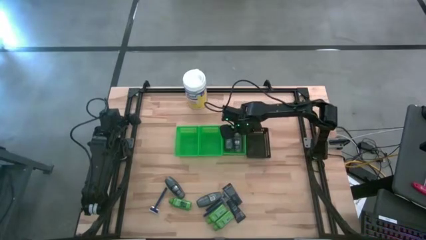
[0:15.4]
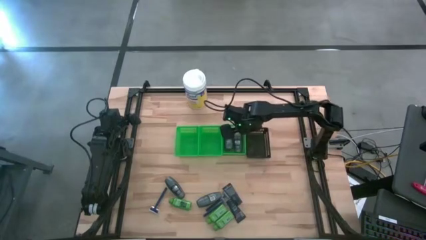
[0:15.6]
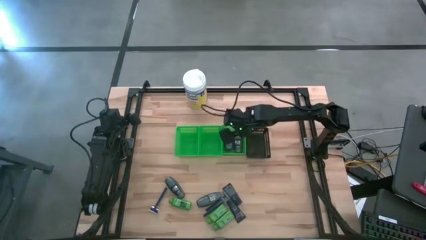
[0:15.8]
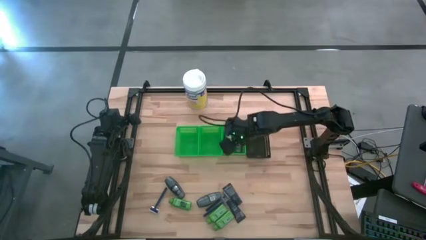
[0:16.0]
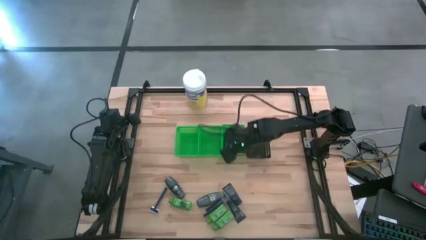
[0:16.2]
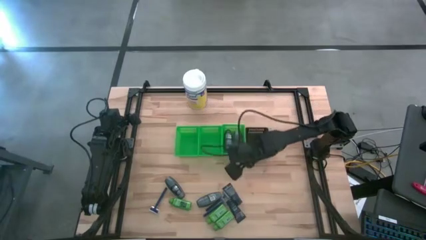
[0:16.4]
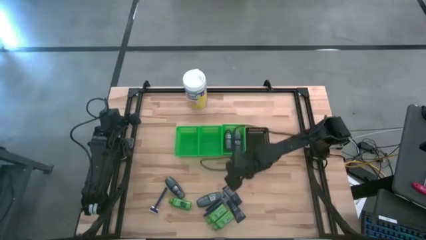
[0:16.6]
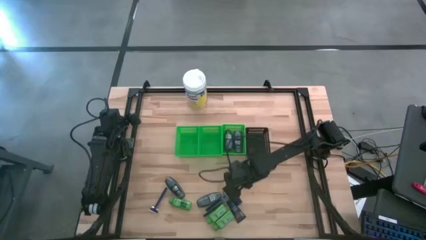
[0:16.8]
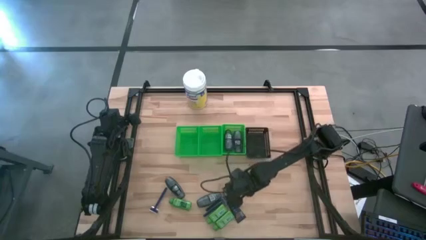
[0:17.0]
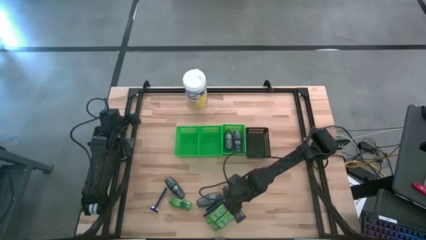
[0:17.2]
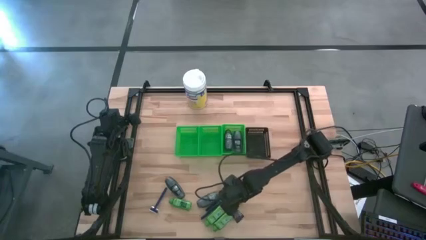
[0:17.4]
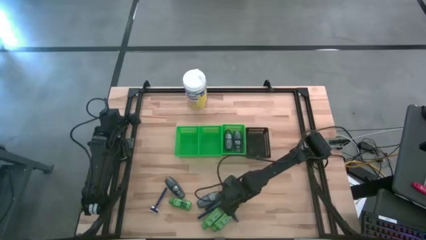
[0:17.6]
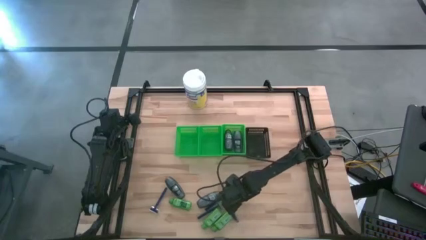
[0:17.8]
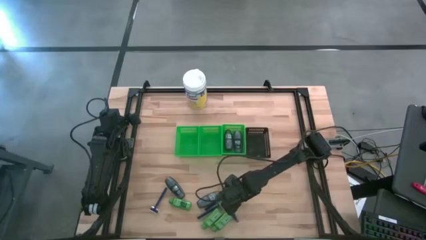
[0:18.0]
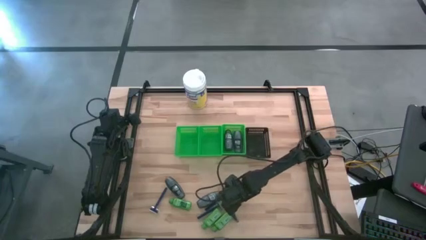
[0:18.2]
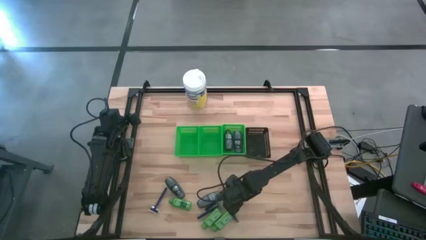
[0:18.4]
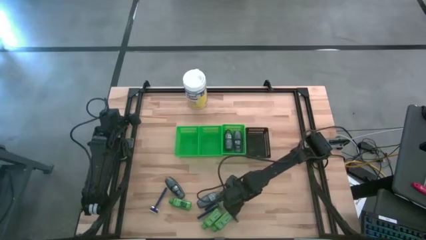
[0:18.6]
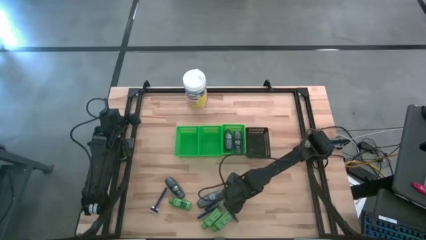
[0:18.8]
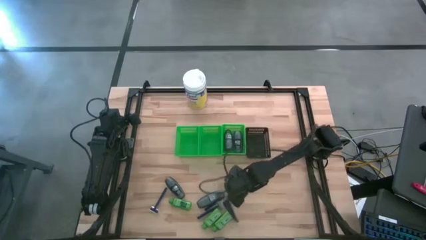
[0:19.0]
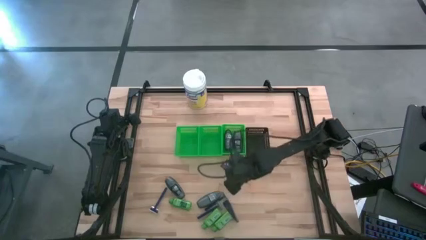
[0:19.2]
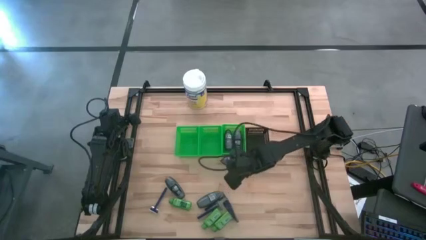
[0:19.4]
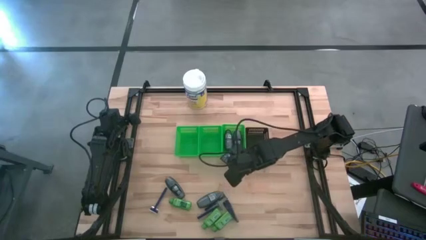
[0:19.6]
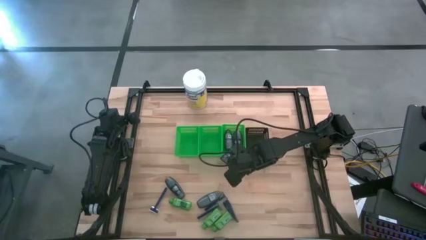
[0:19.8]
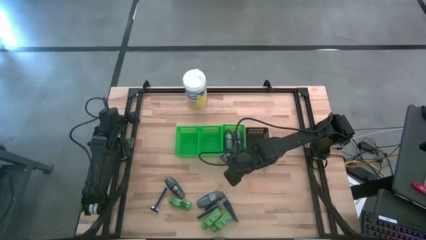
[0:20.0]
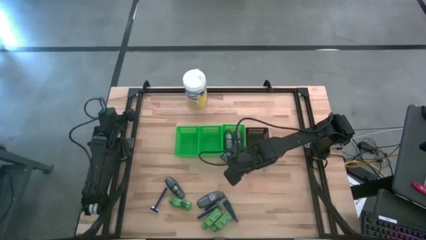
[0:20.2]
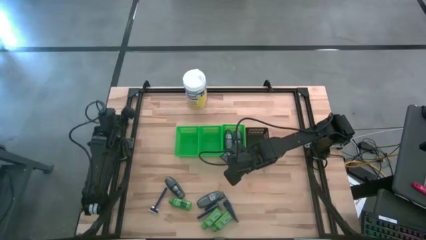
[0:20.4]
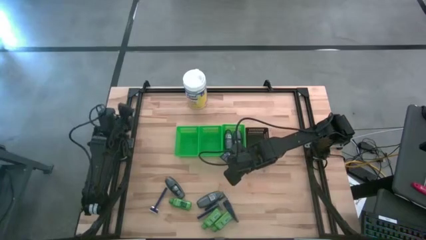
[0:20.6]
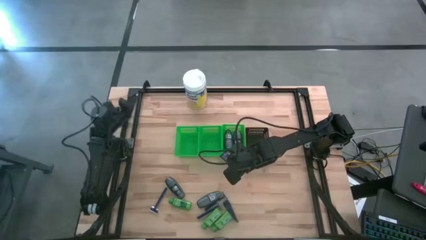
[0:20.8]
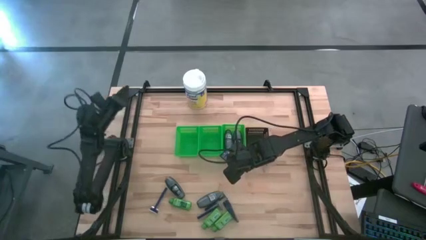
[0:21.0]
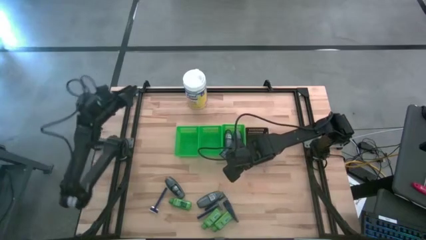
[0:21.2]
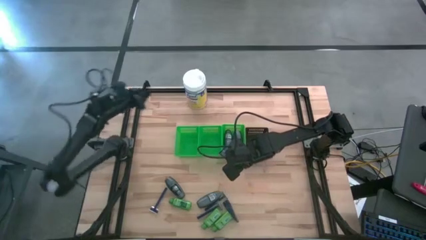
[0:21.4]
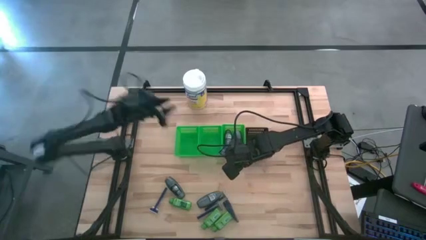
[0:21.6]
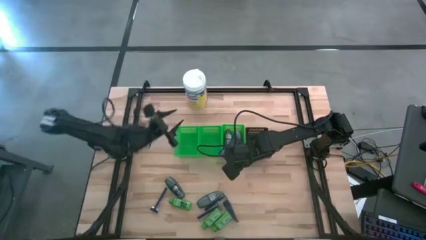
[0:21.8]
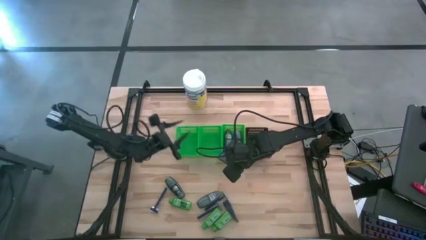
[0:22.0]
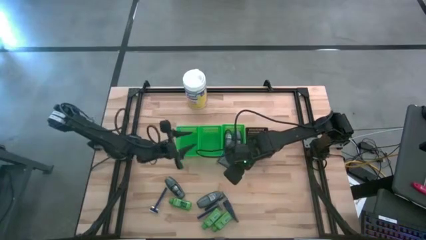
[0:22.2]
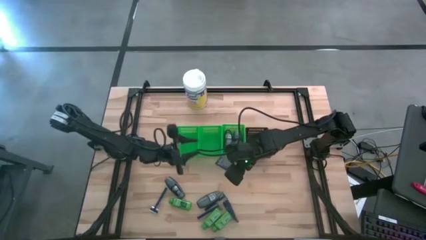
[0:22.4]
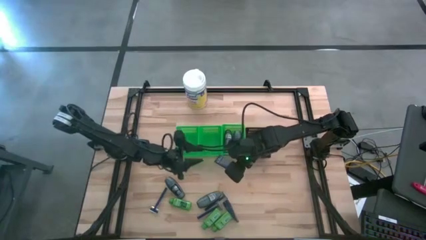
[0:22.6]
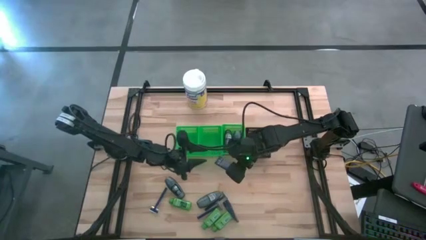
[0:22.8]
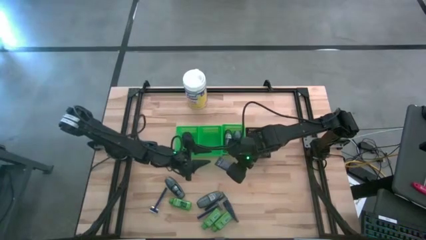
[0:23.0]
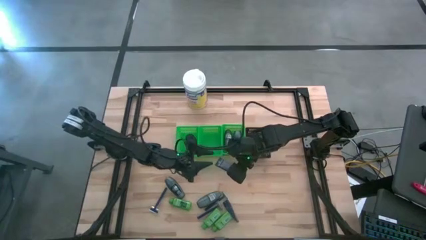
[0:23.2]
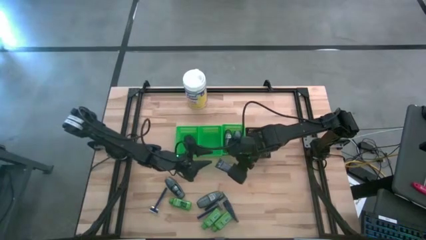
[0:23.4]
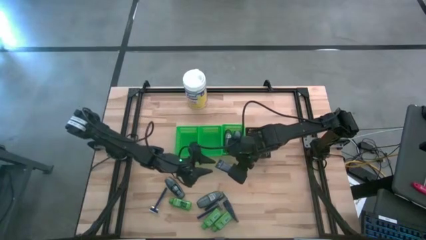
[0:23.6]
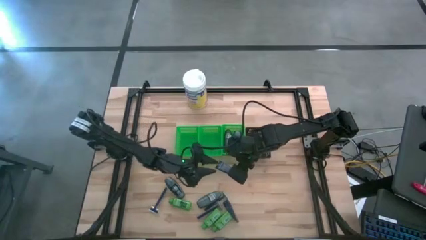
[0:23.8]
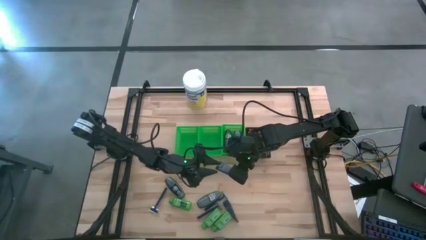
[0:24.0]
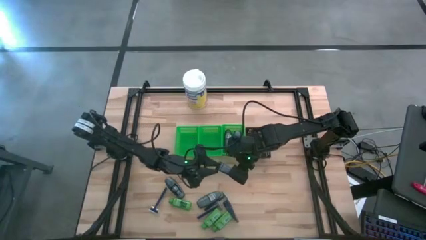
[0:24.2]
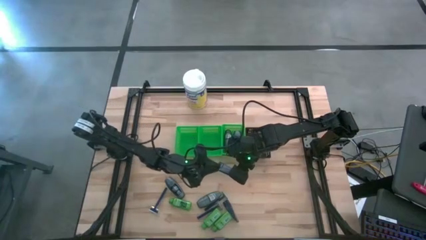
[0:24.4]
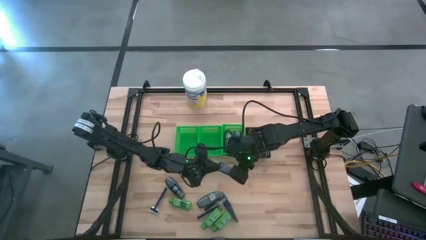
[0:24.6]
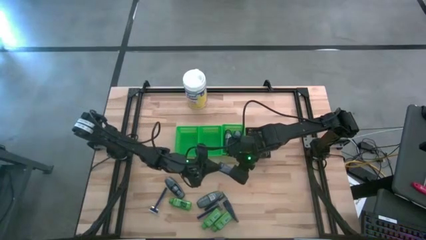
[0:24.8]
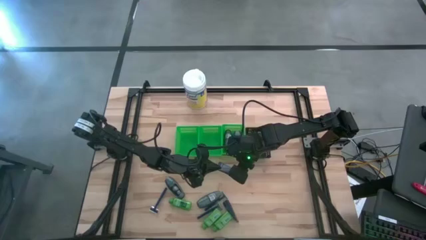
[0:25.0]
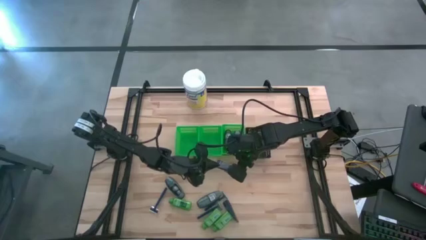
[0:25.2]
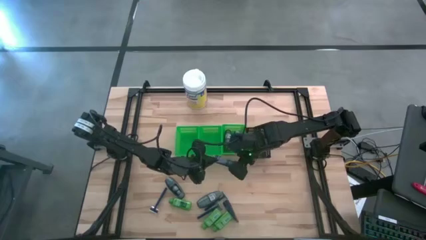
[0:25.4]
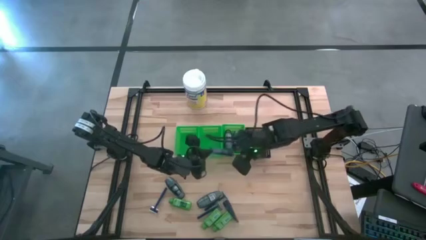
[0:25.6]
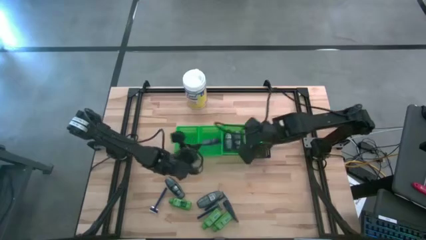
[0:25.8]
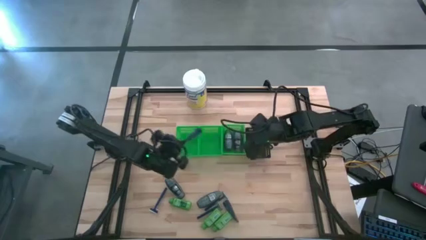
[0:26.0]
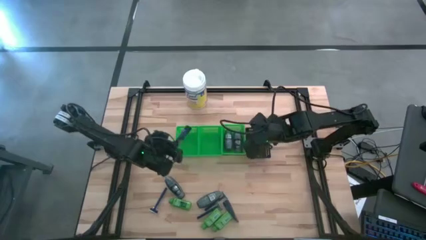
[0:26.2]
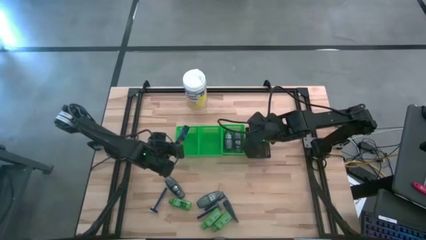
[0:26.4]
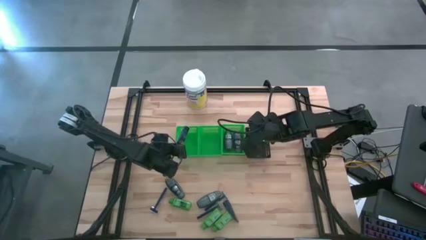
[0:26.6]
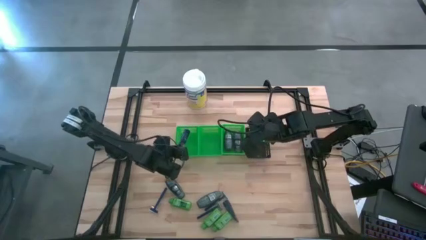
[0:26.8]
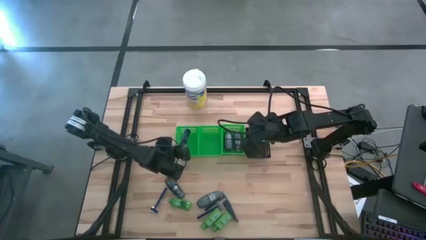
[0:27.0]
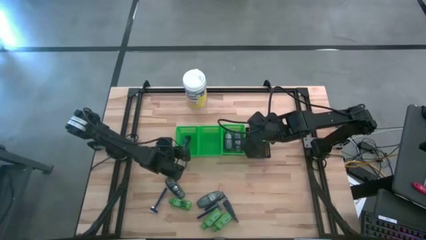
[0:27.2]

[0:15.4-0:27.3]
Task: Pick & Place Travel size toiletries
Put the dark blue shave cream into the left green bin

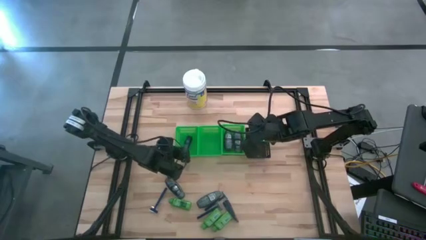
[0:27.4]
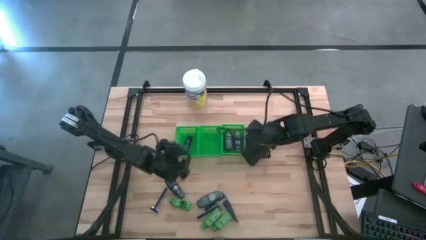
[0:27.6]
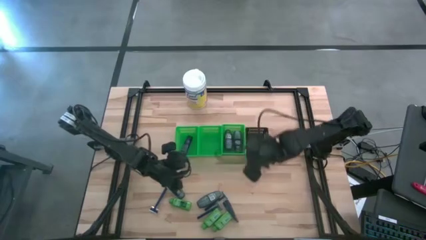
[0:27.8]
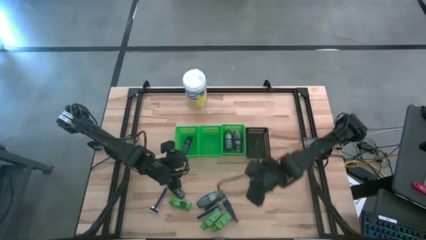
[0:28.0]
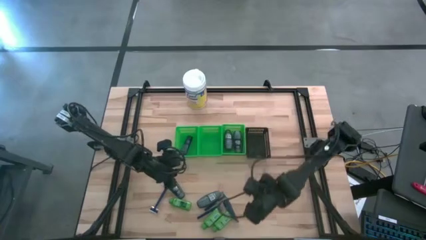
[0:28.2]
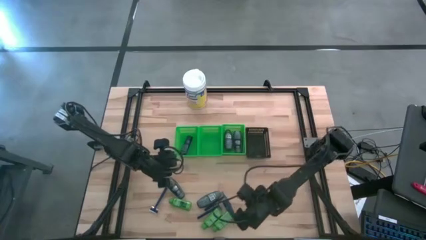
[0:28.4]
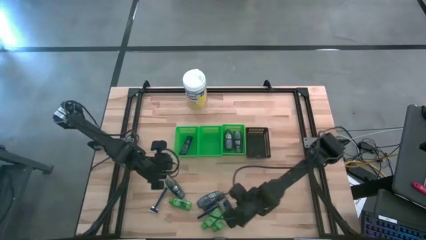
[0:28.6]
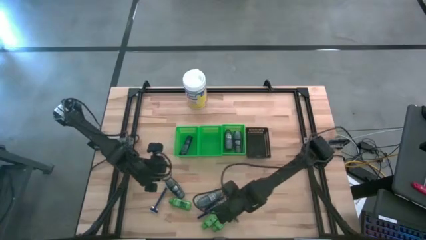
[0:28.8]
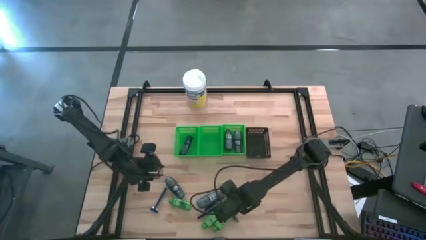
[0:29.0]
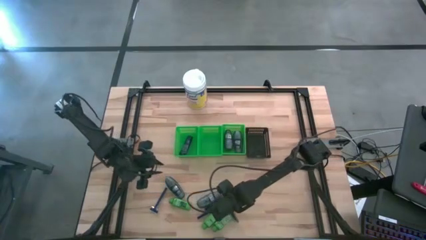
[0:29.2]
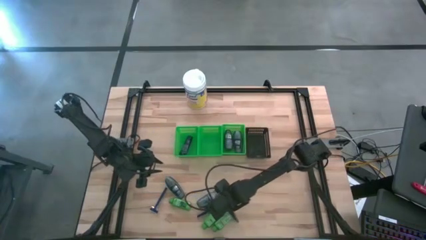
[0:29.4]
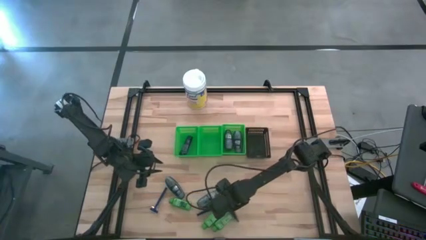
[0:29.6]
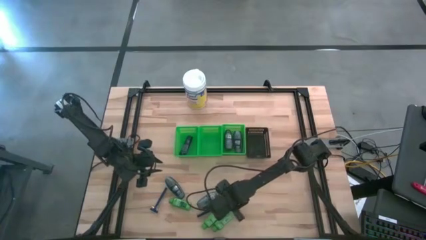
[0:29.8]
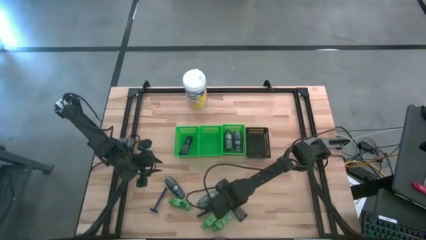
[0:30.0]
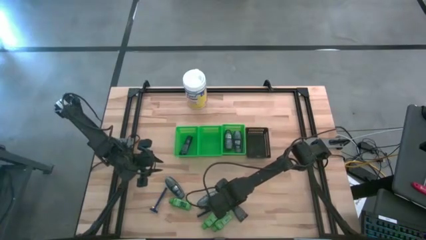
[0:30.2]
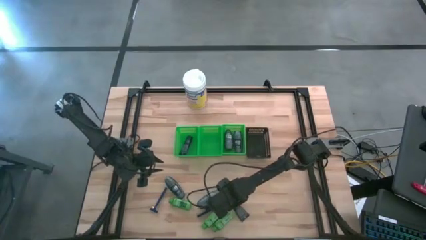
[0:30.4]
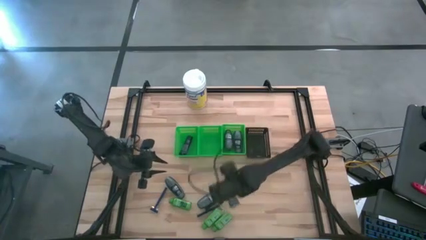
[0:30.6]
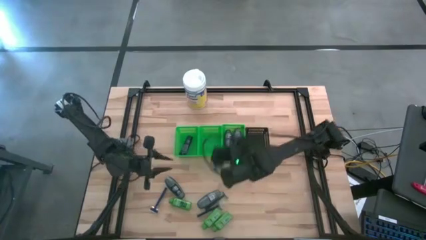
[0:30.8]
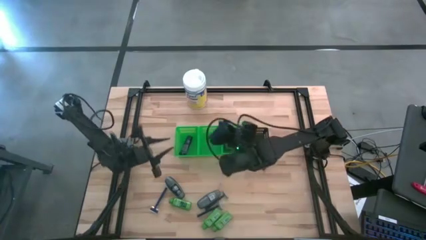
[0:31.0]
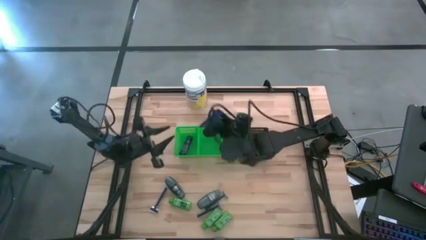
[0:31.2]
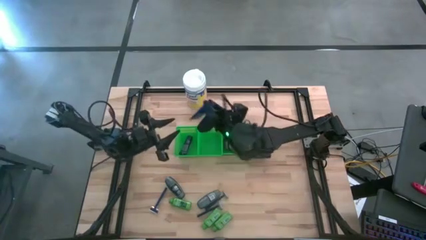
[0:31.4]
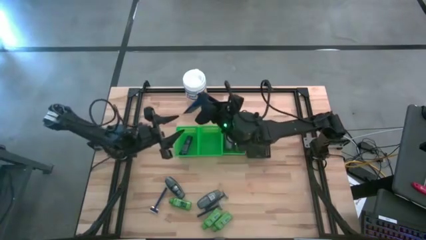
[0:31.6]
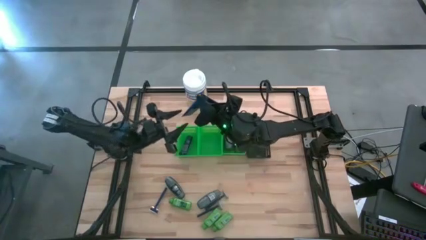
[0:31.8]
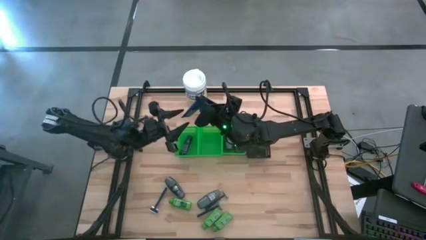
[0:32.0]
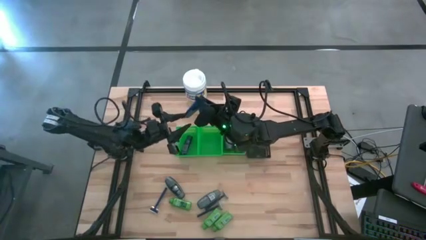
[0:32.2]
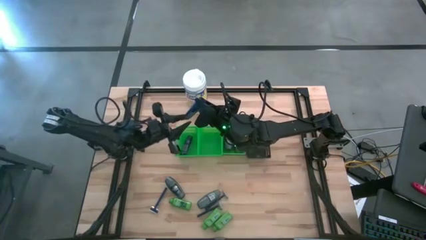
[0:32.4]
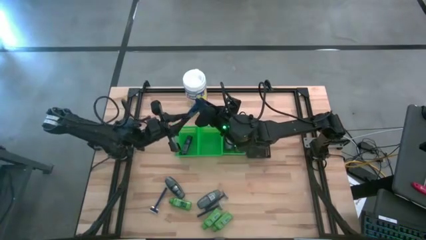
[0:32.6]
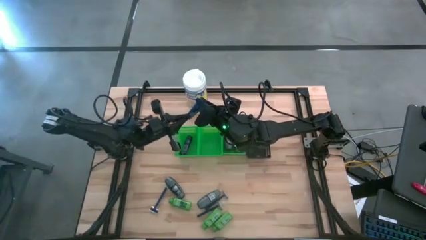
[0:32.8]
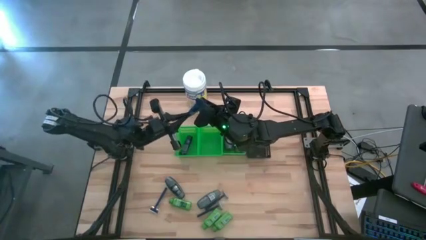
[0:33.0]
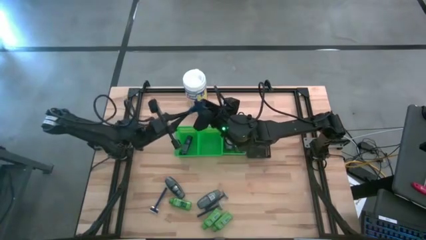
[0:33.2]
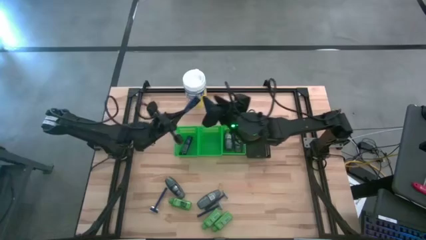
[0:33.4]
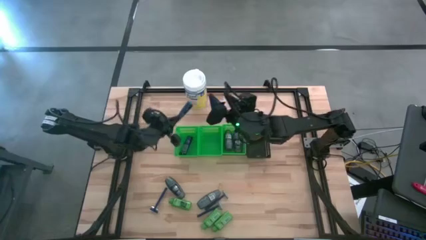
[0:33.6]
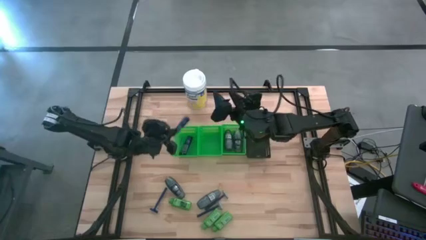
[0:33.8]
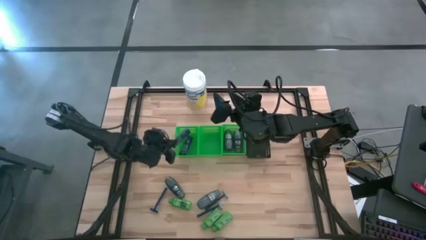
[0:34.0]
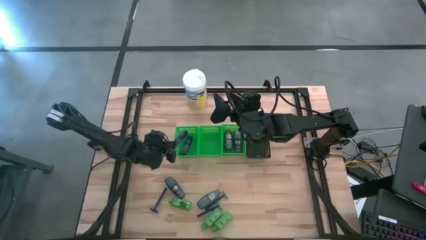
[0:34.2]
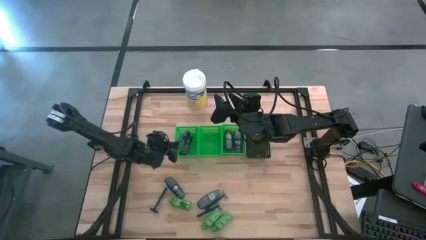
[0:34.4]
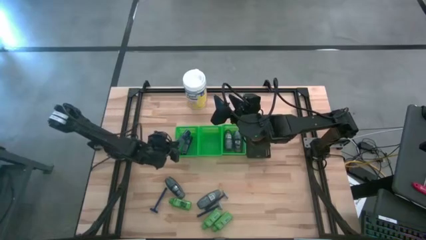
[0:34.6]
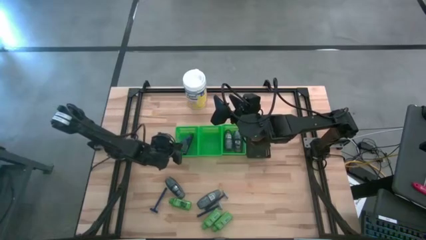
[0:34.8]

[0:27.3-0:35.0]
Put the dark blue shave cream into the left green bin
